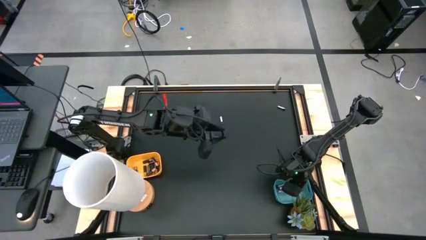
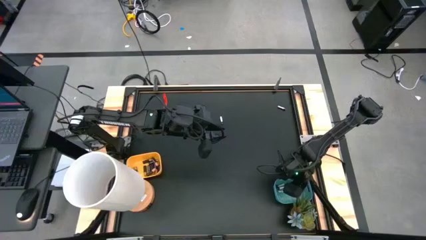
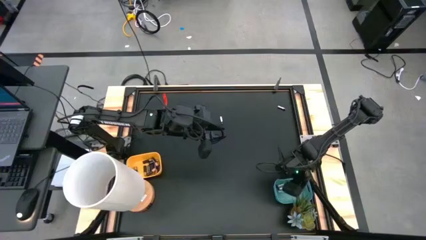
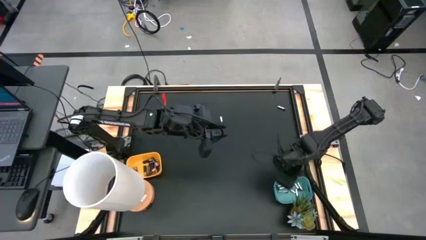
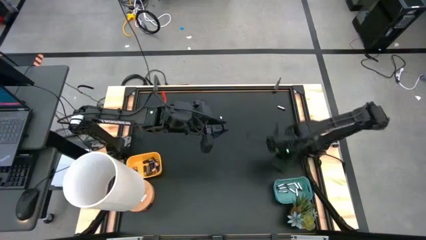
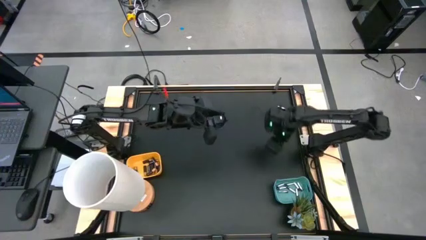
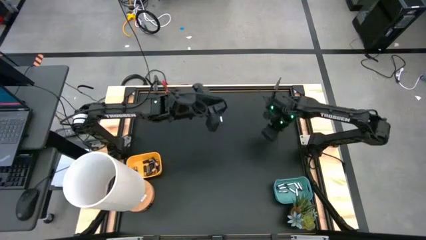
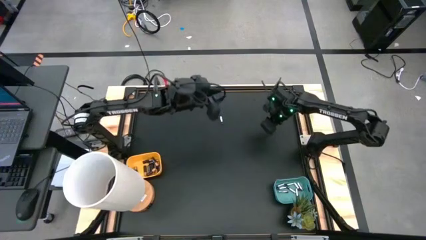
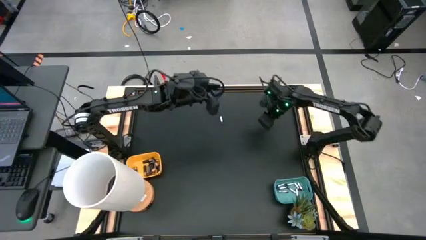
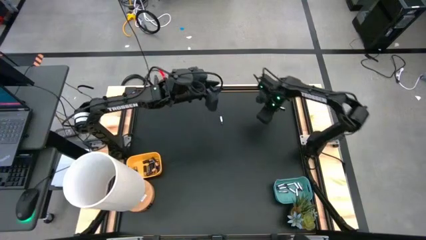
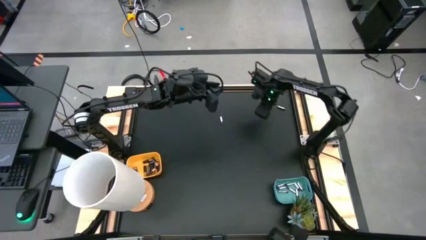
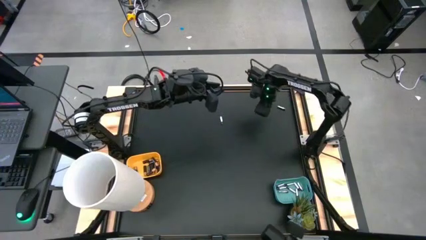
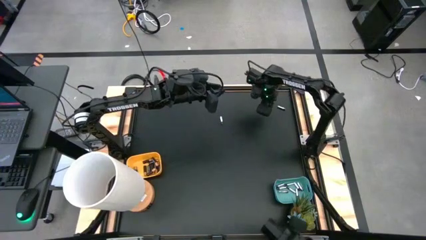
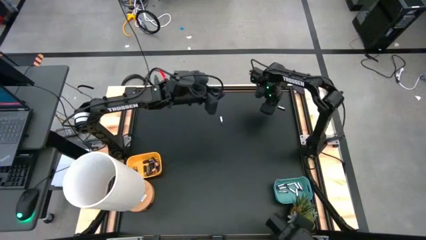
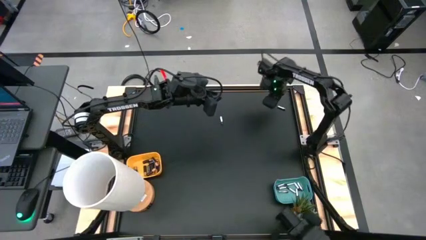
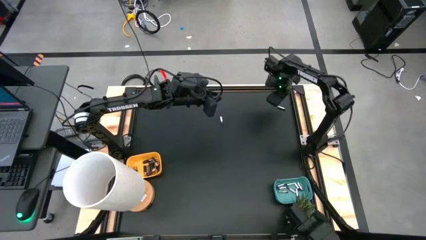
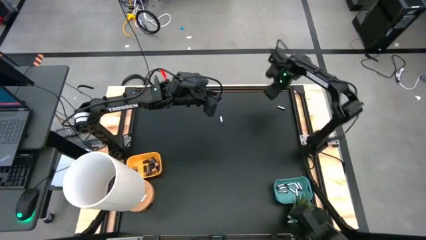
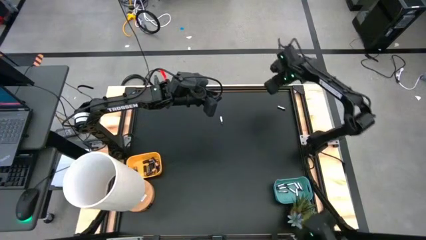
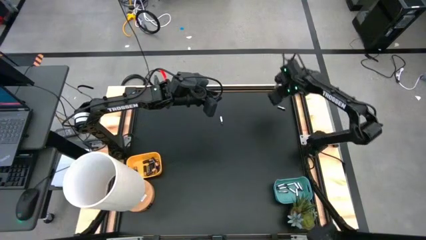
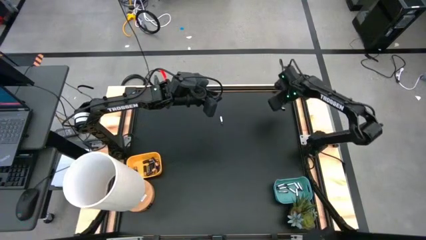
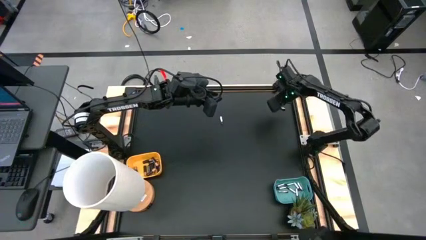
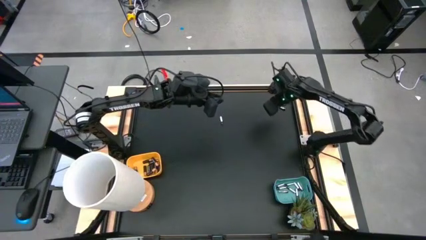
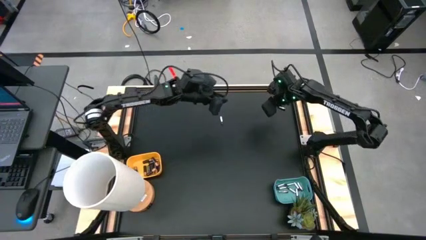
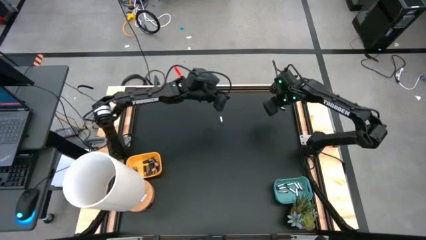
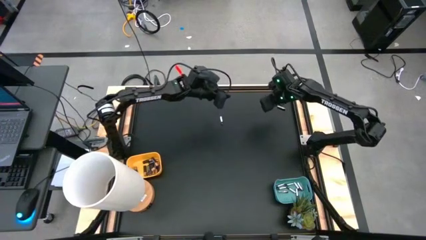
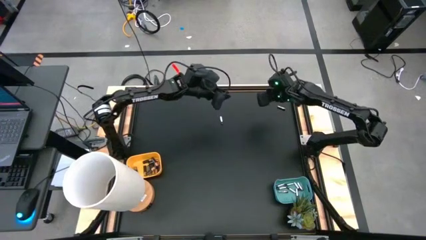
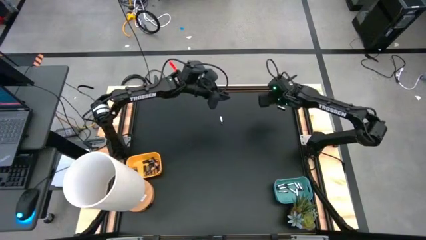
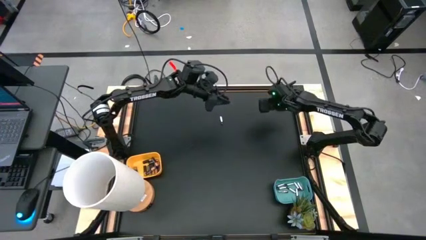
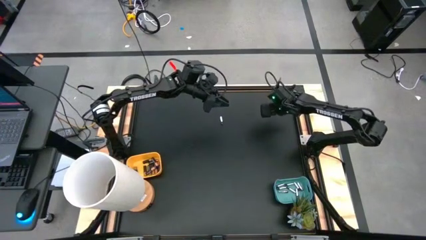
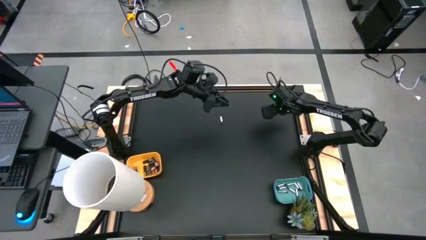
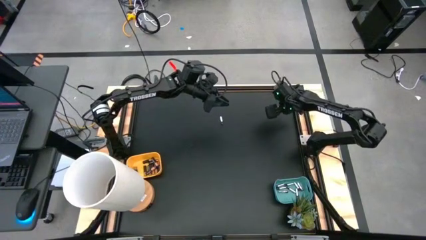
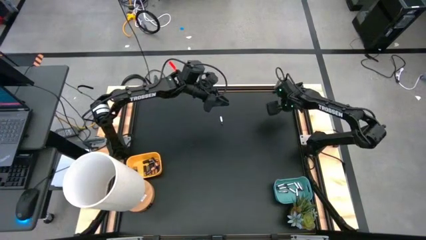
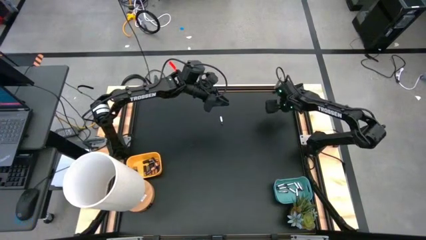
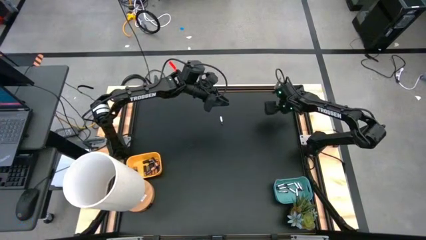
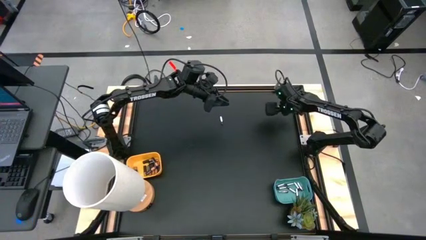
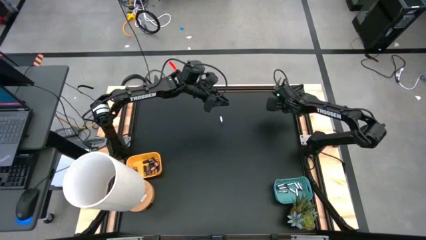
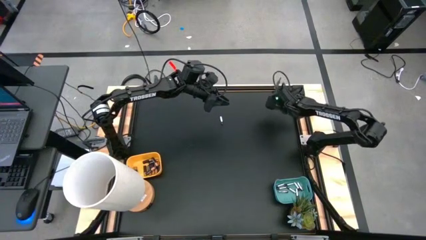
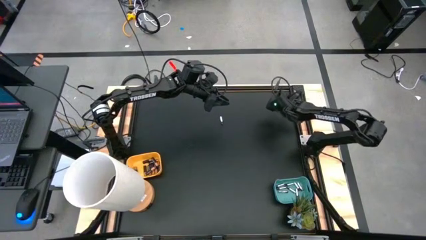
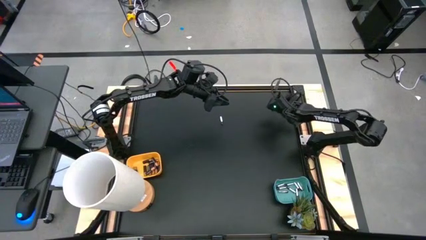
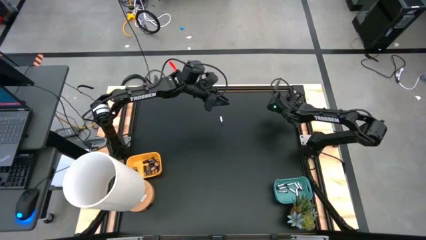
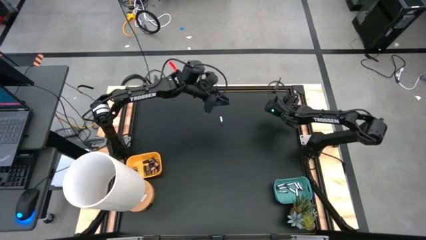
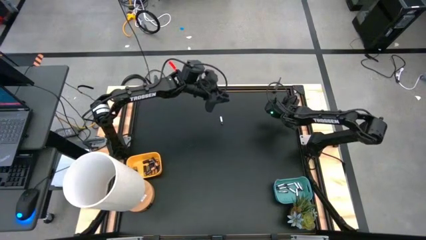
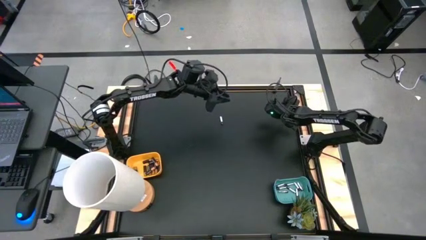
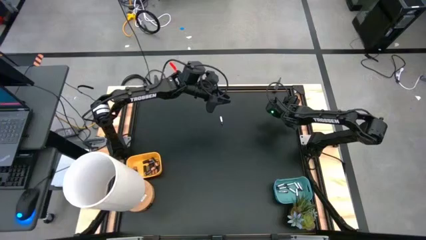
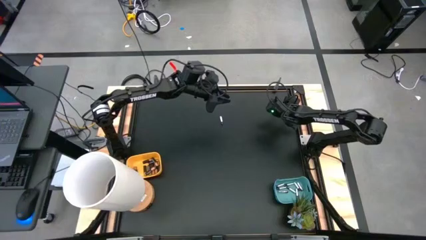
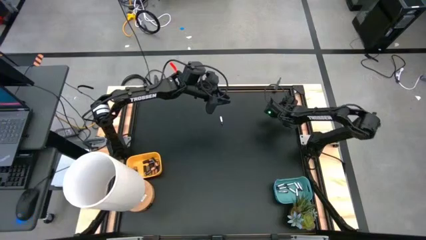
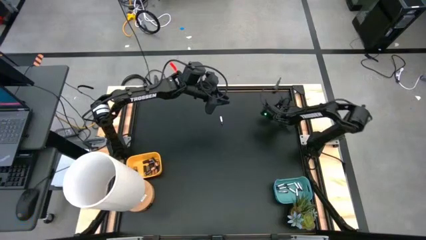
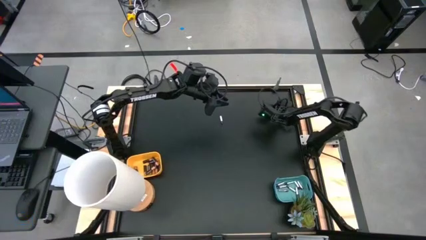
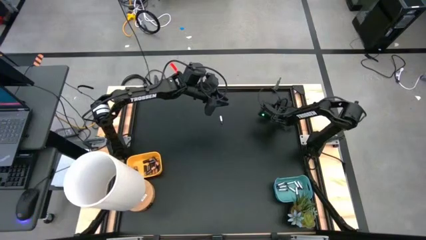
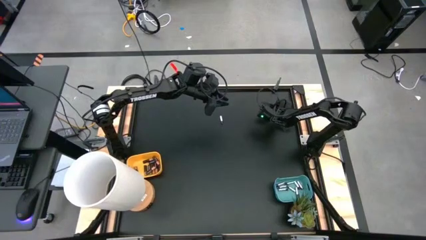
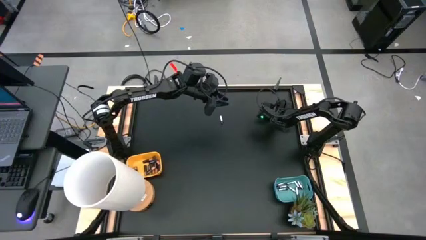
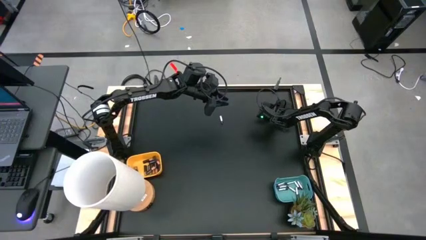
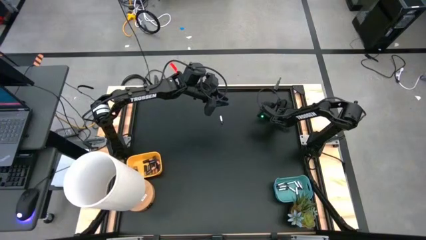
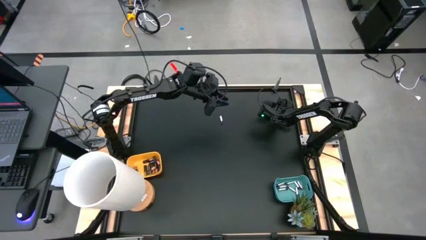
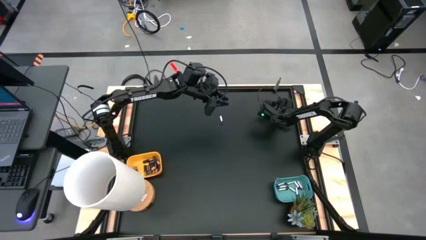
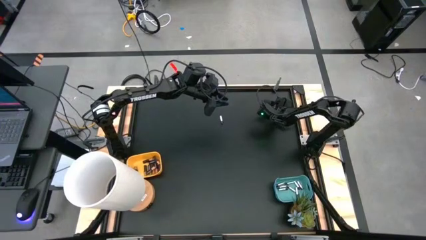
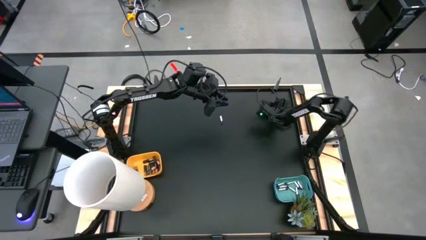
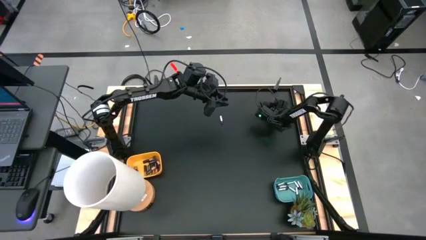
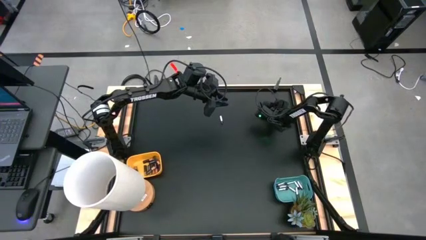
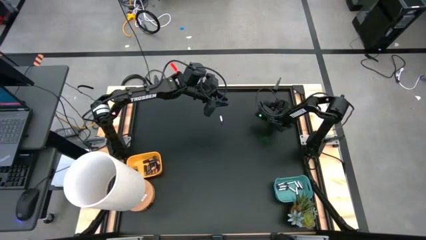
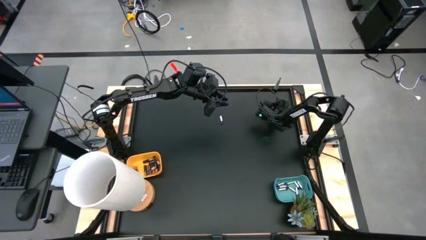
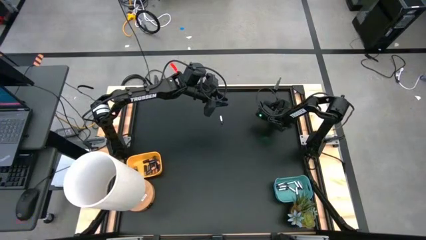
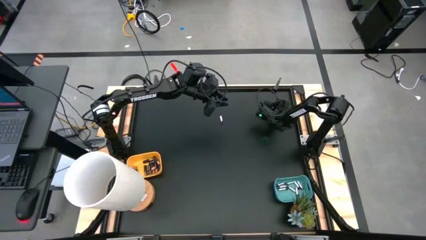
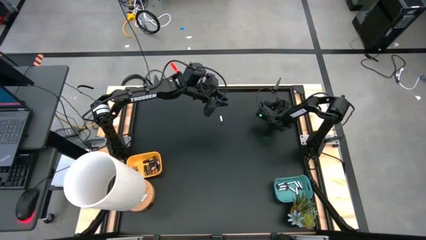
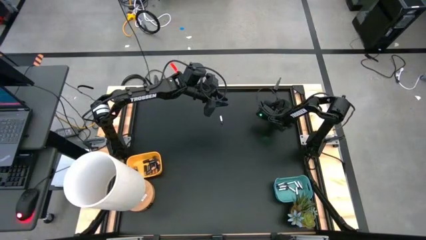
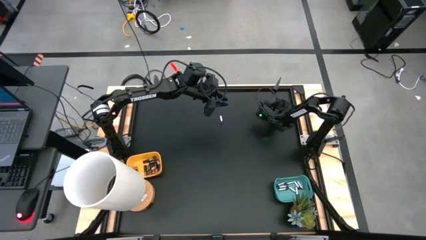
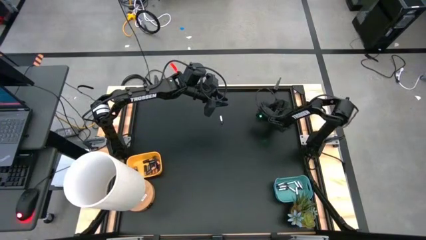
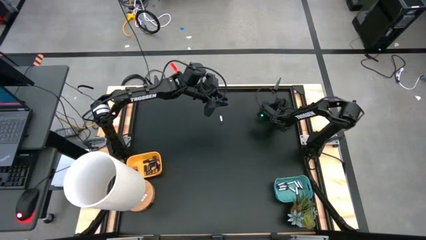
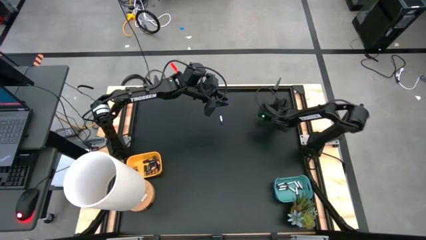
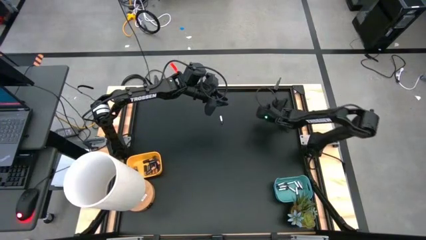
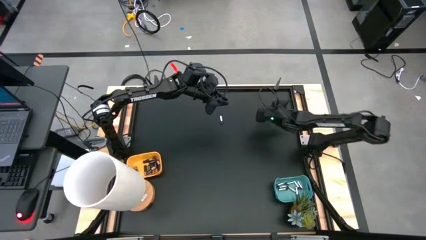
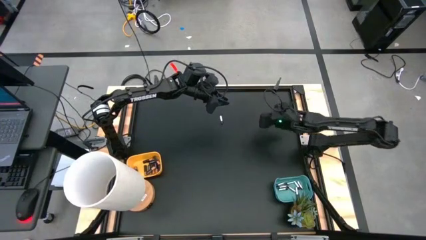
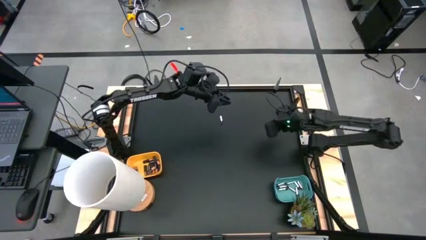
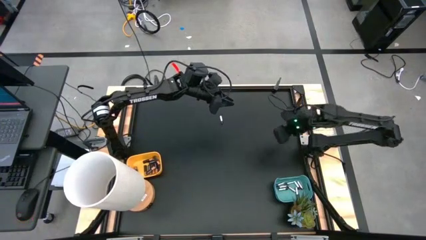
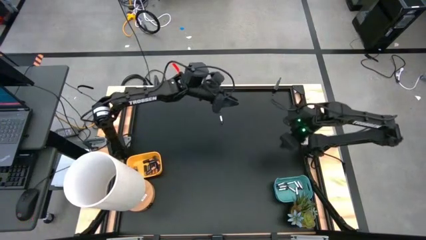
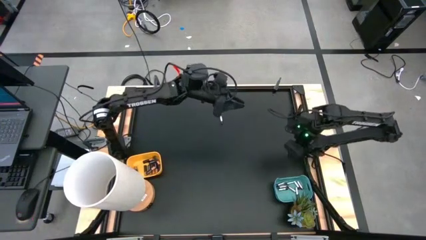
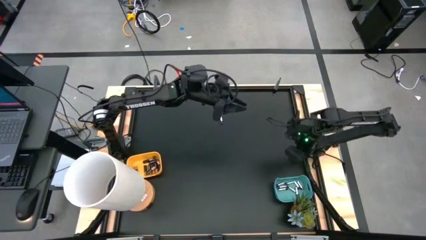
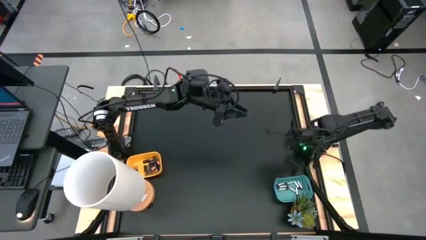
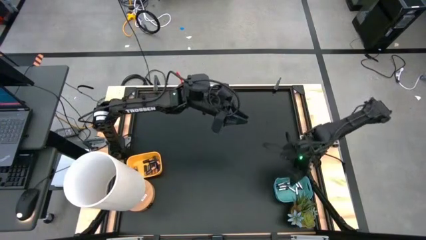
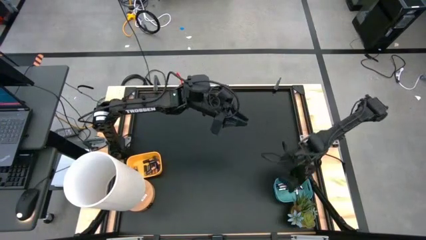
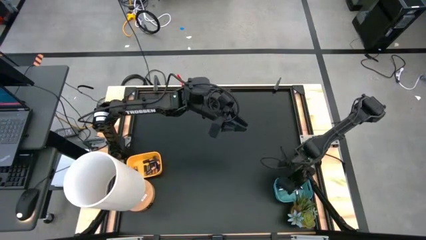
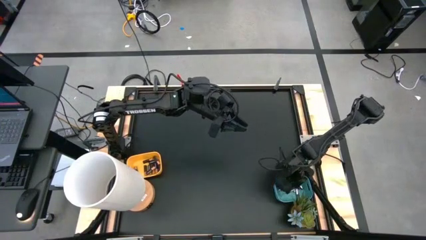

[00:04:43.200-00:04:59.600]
Task: Sort batteries
Put the silver battery into the green bin
